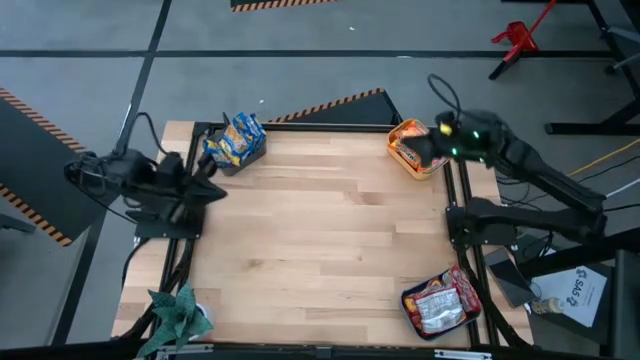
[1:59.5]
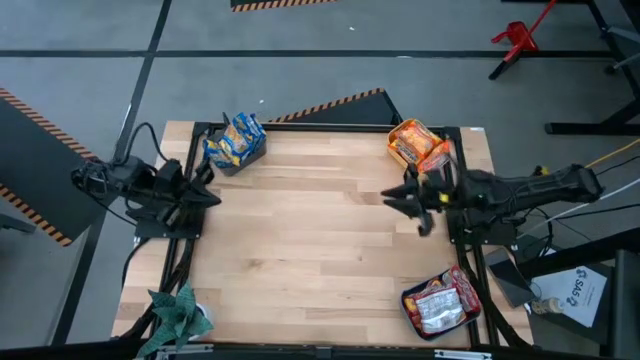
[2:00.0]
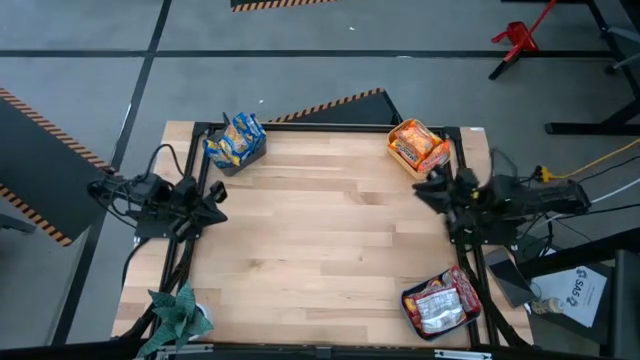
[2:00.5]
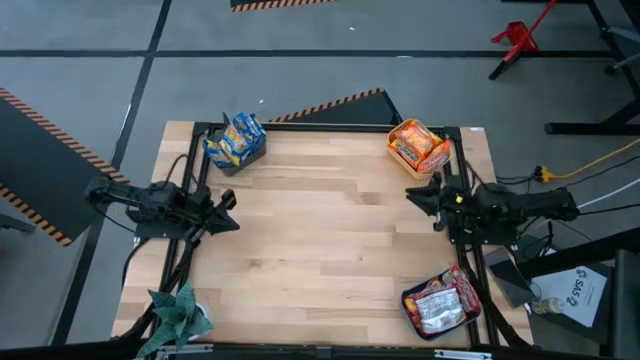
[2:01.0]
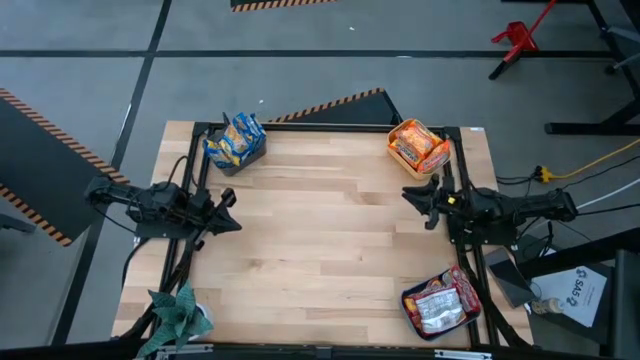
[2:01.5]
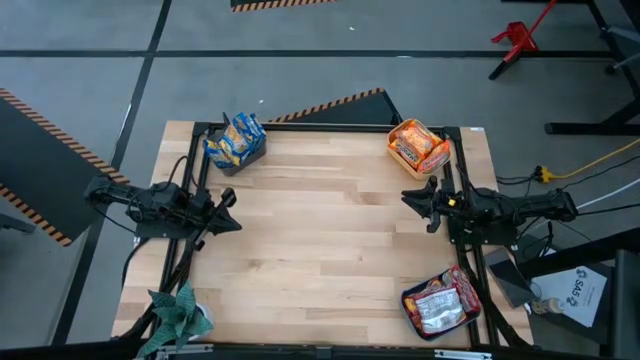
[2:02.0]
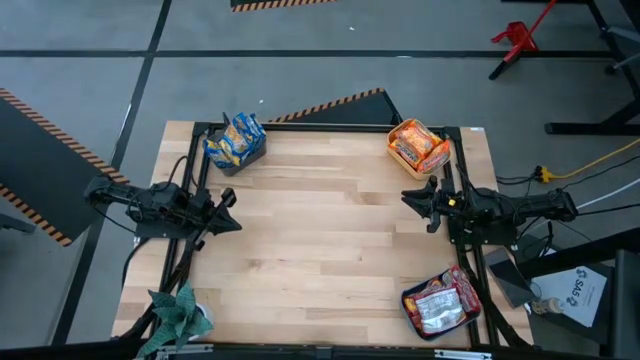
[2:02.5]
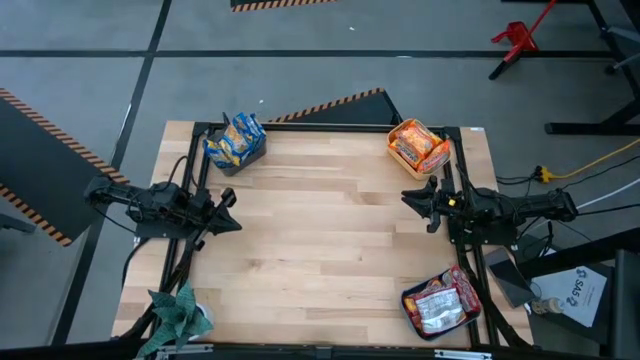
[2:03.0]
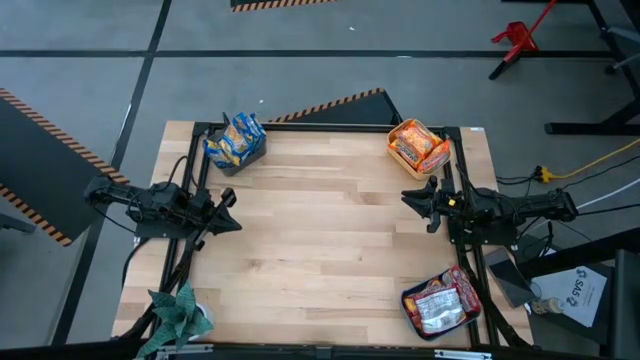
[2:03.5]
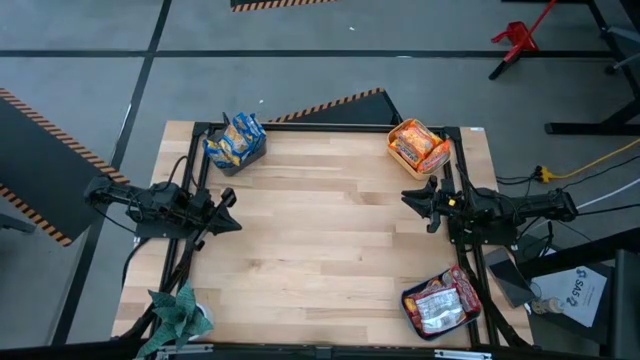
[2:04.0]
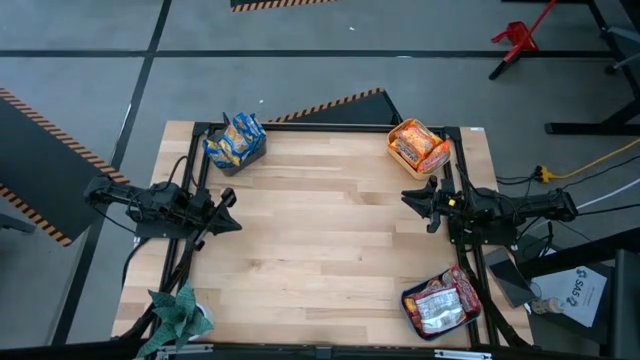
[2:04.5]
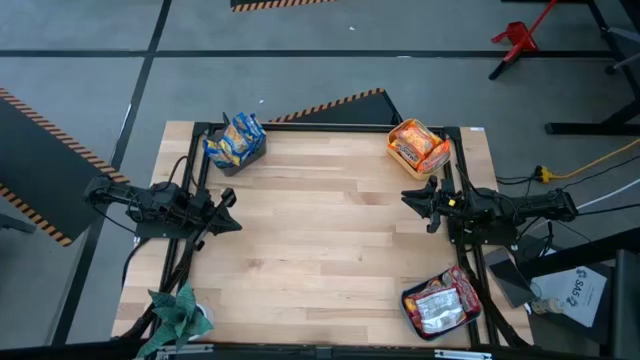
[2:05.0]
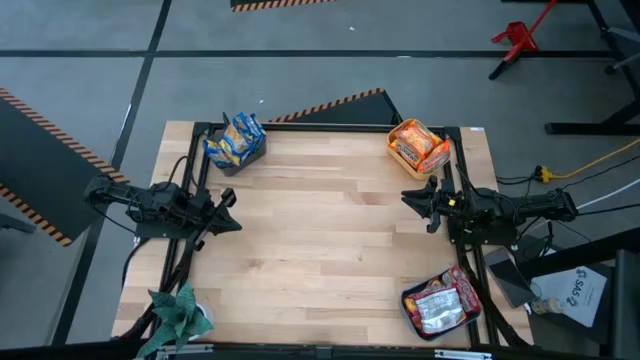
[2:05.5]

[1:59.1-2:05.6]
Task: Sort Maruchan noodles
Return to Home Position

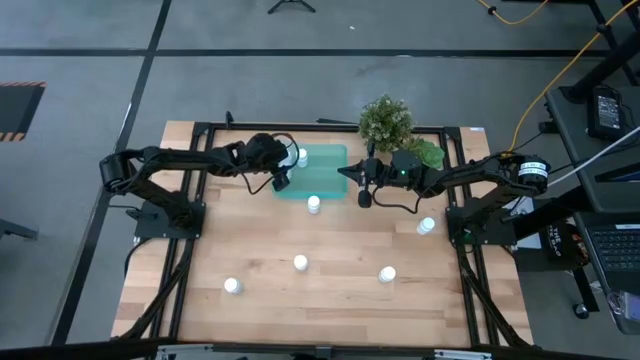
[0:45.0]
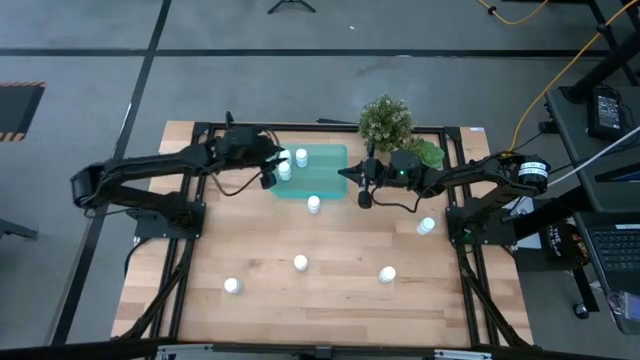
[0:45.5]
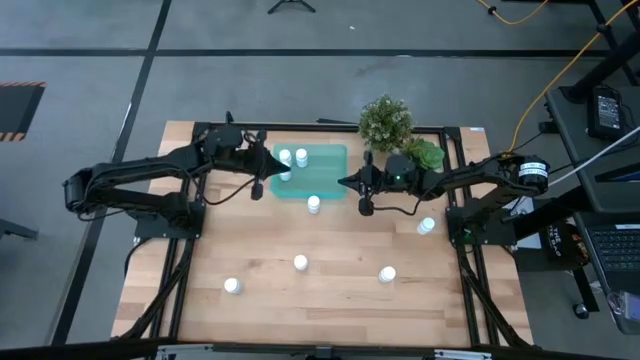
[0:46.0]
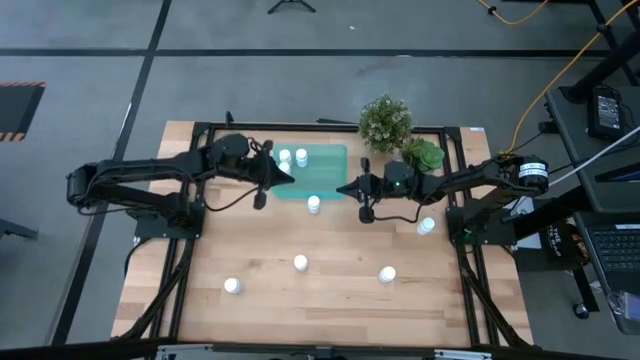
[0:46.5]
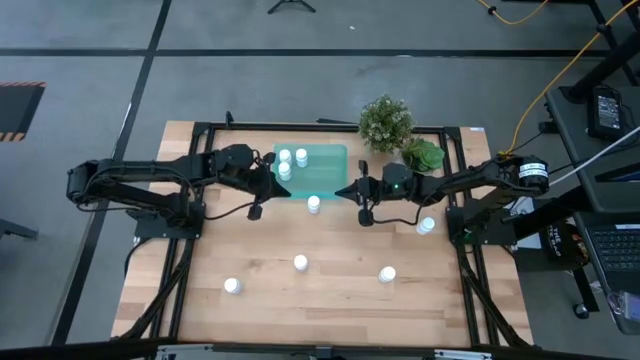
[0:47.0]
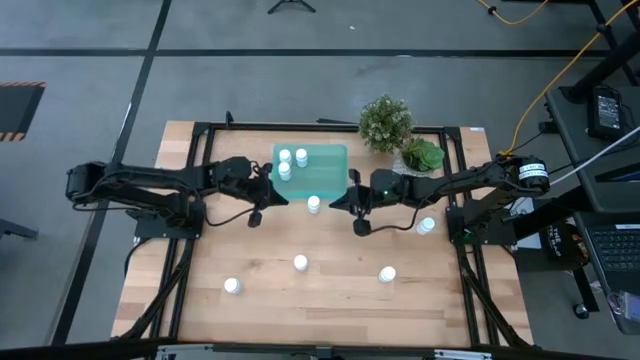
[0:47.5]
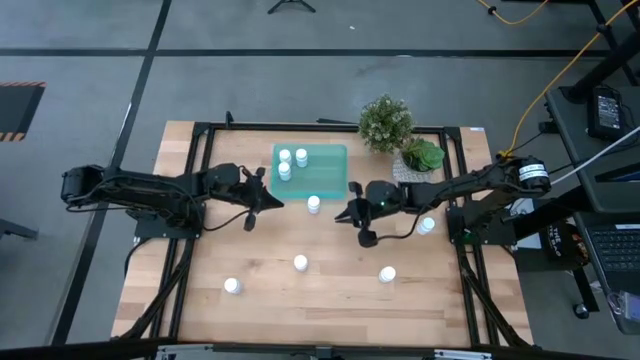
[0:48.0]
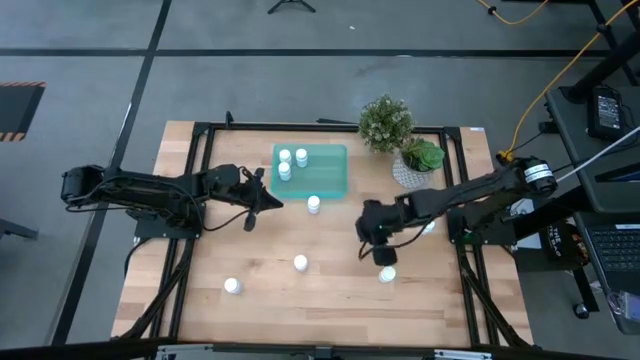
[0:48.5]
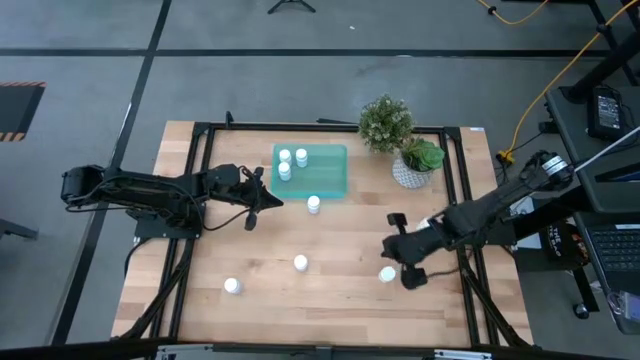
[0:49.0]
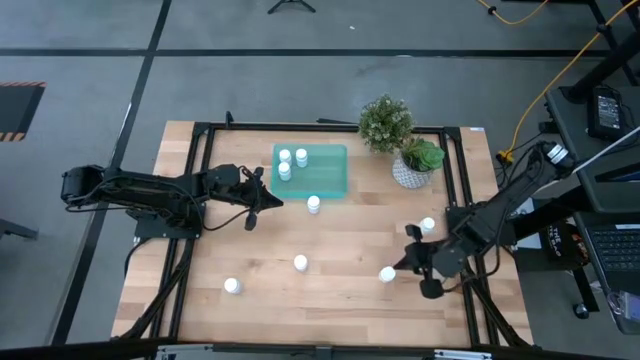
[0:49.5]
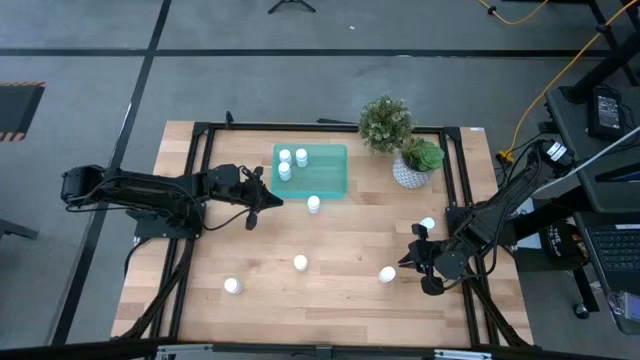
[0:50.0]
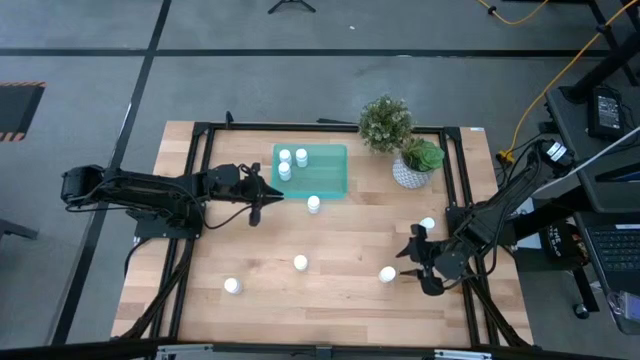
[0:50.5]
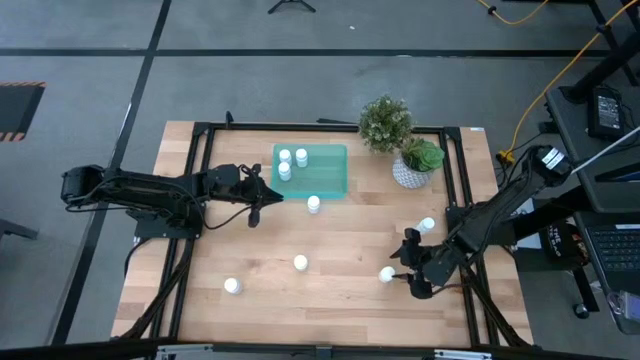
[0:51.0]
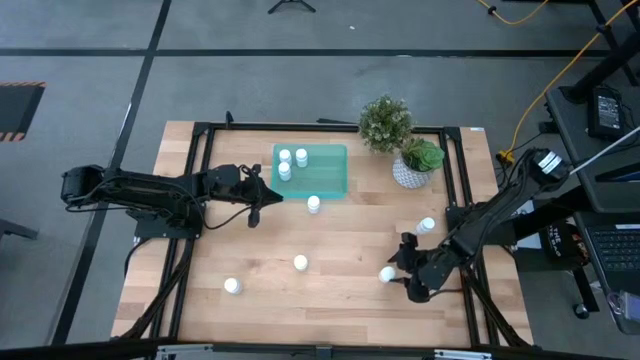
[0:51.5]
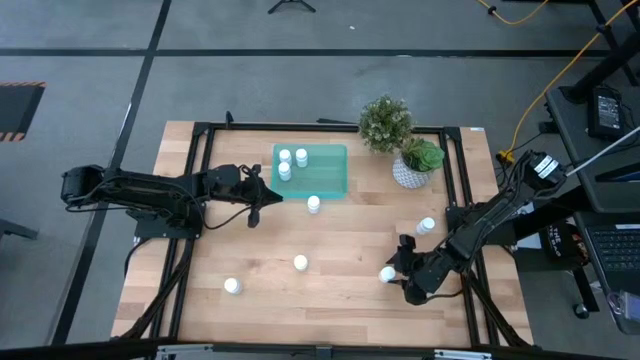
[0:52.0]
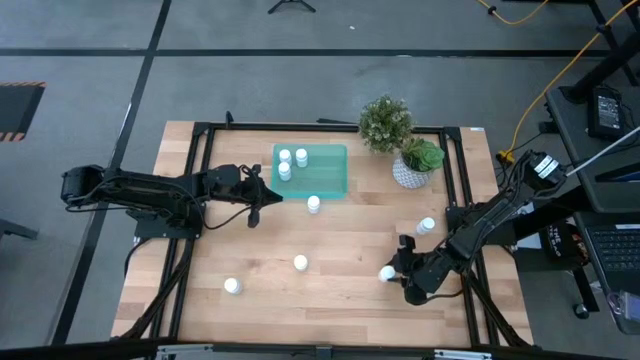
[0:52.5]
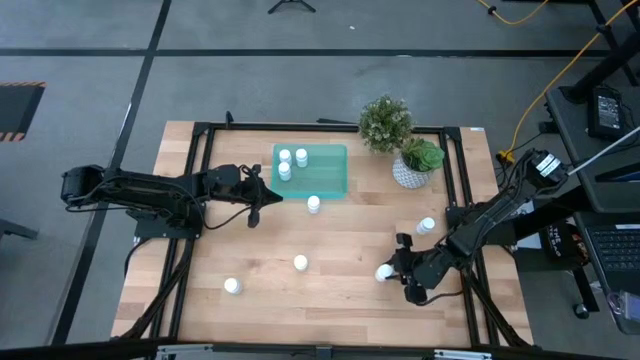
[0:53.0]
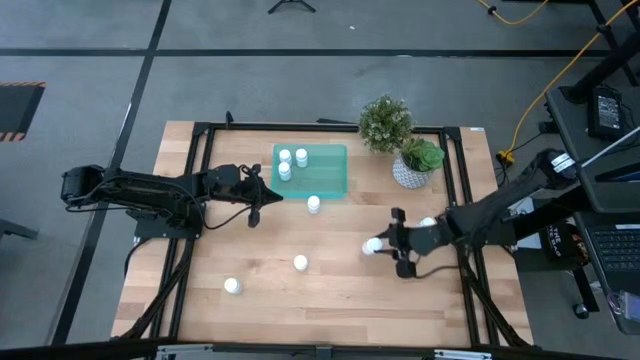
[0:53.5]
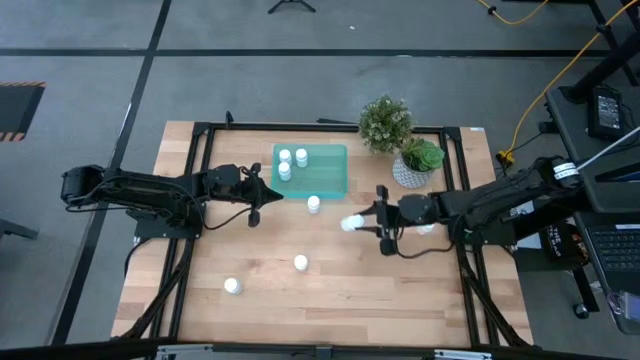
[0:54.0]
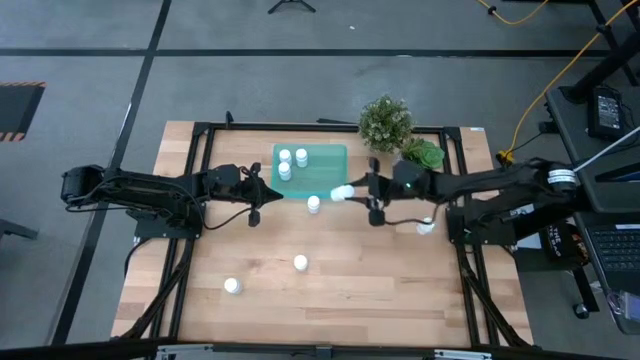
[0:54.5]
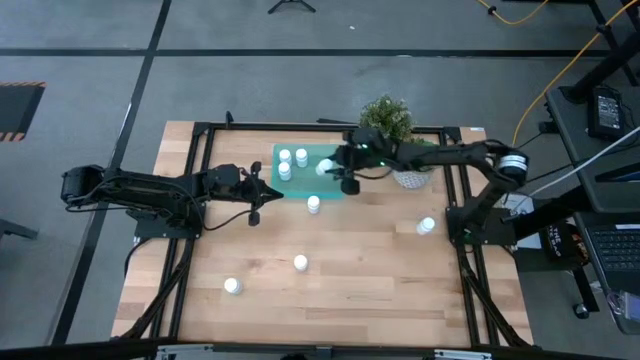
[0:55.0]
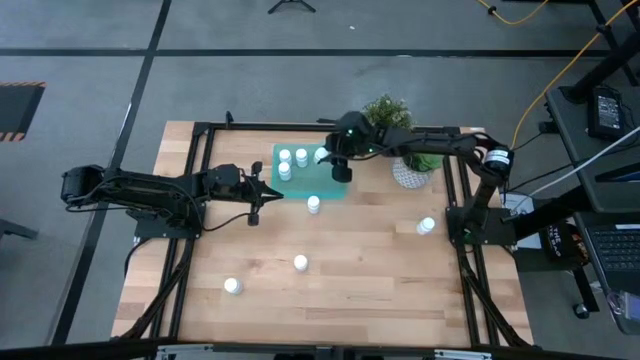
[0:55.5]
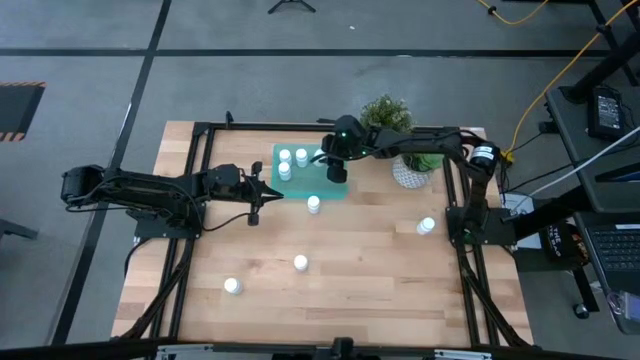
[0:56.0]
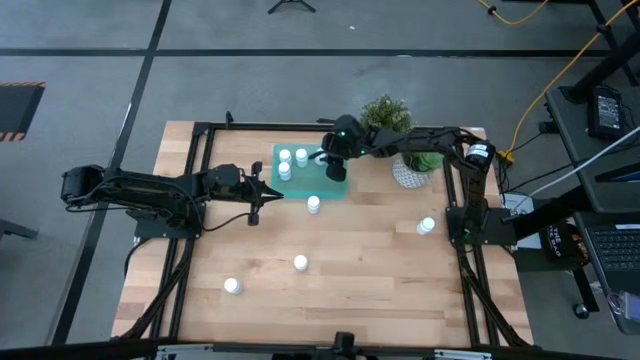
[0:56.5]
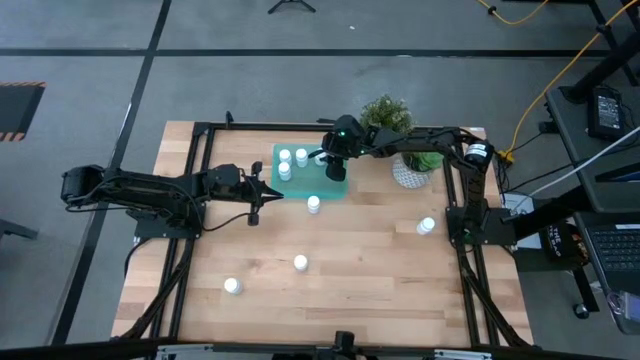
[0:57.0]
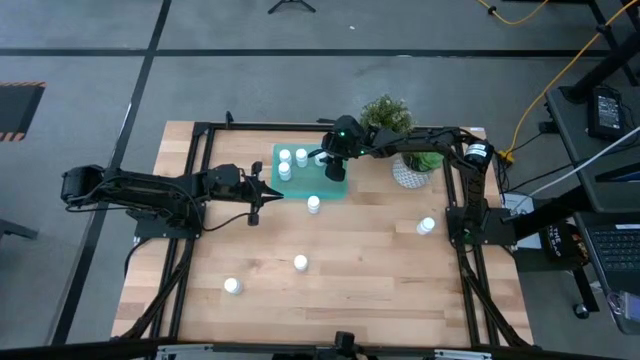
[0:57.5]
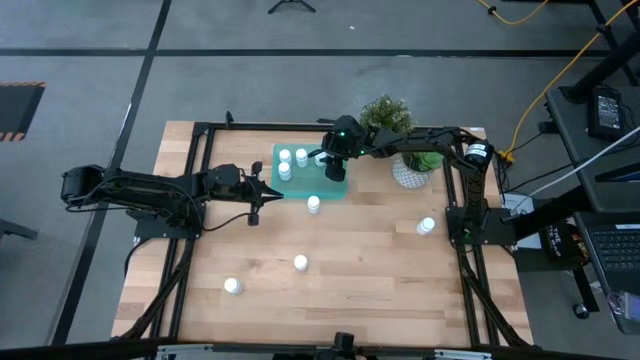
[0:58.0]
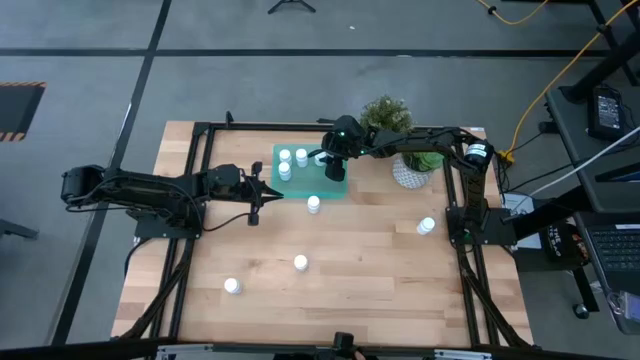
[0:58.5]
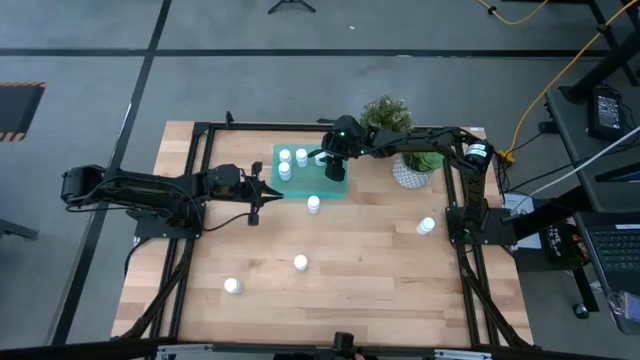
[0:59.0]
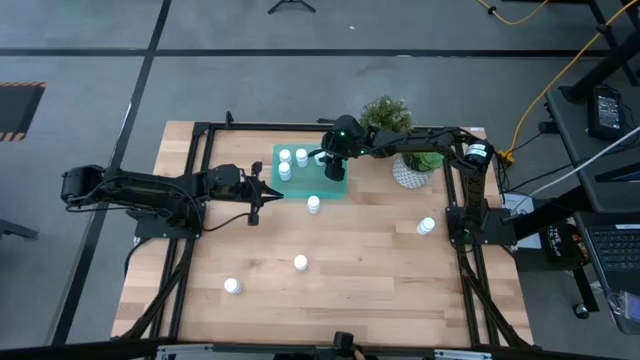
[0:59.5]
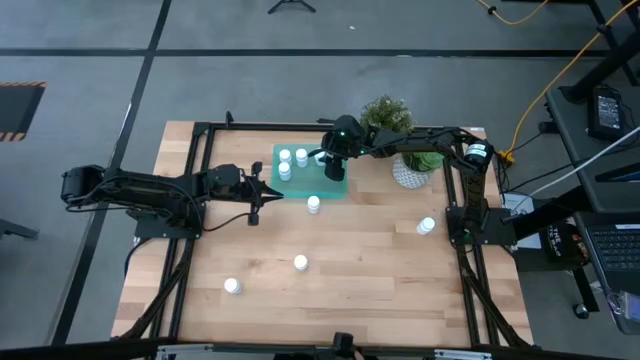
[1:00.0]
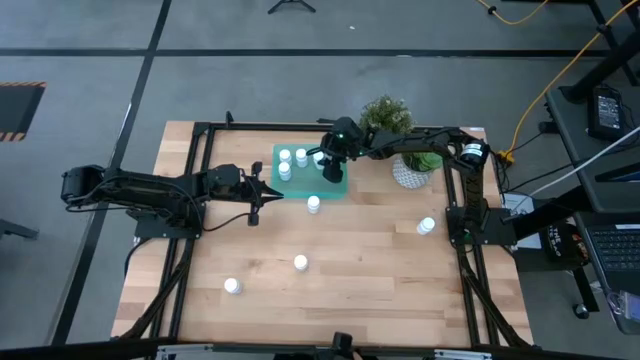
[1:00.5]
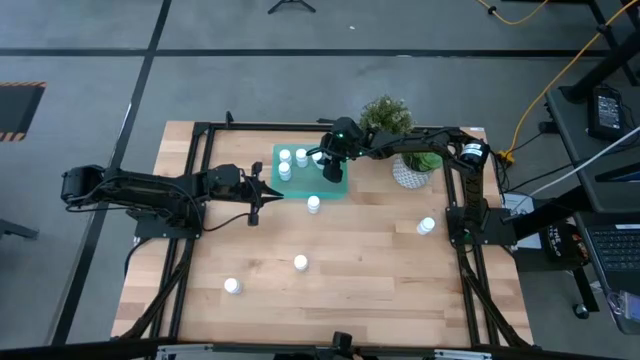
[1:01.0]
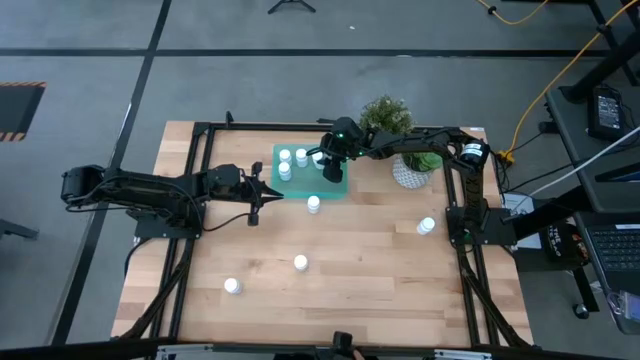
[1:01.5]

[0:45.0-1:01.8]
Task: Pick and place pill bottles into a basket
Put the white pill bottle into the green bin
